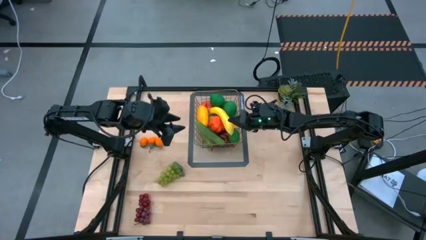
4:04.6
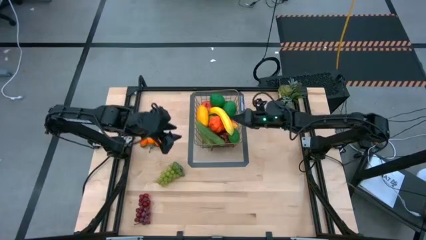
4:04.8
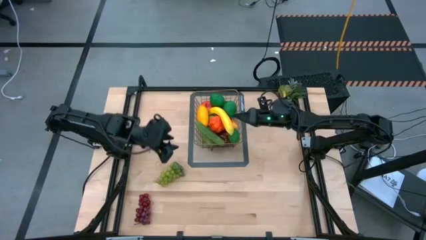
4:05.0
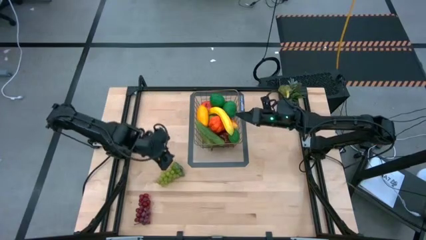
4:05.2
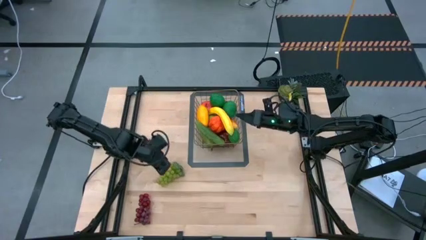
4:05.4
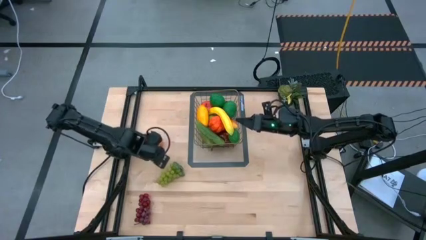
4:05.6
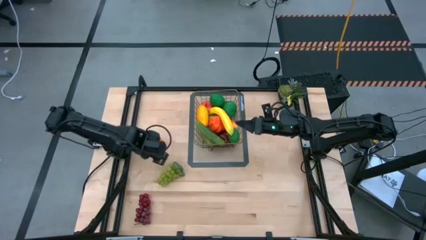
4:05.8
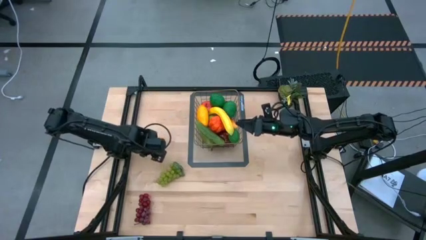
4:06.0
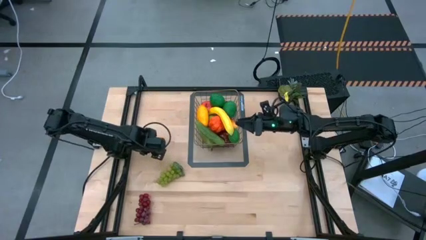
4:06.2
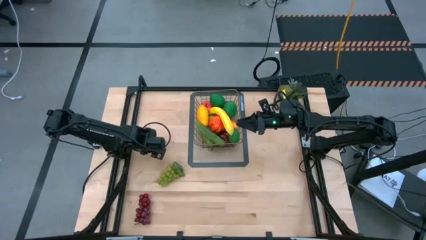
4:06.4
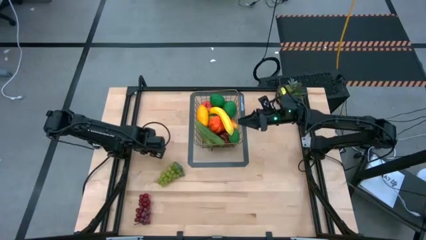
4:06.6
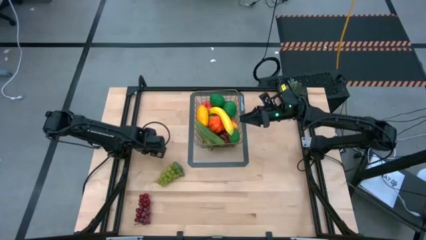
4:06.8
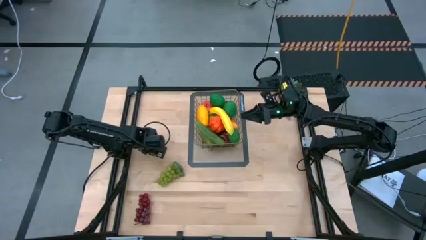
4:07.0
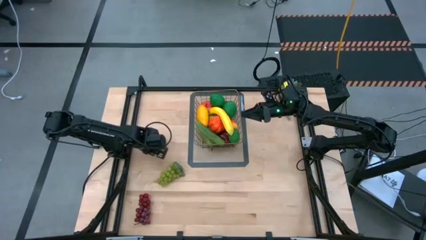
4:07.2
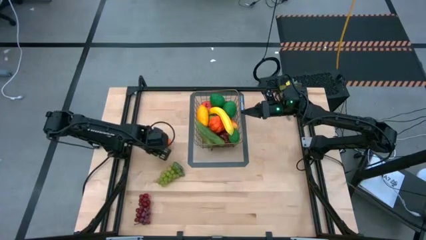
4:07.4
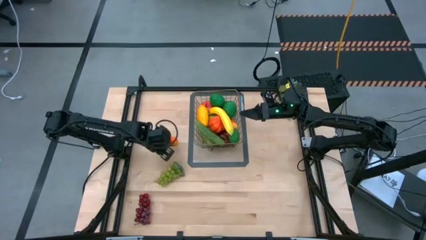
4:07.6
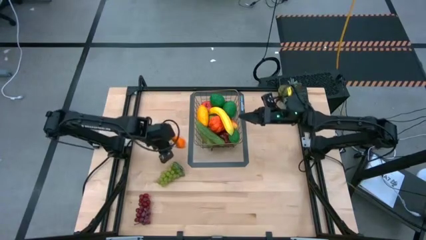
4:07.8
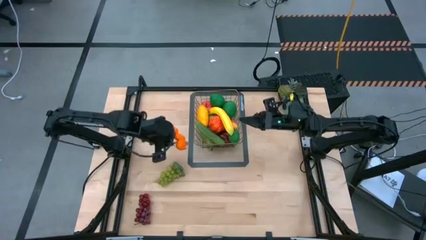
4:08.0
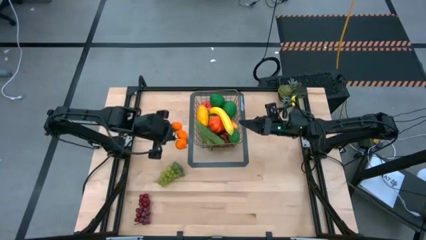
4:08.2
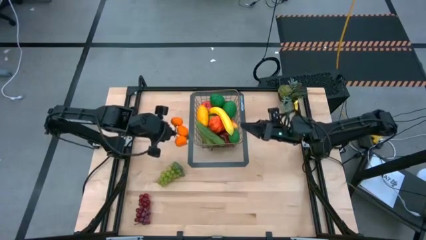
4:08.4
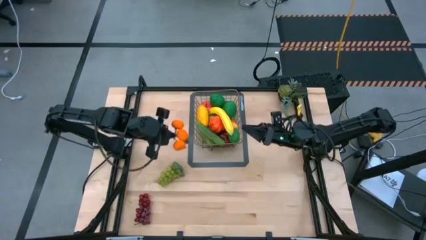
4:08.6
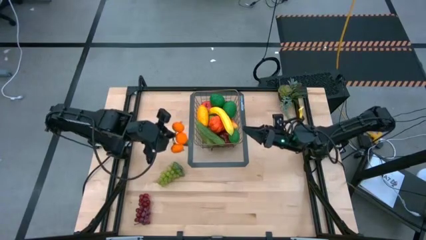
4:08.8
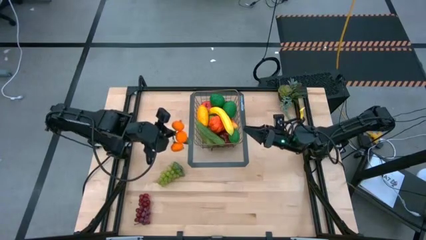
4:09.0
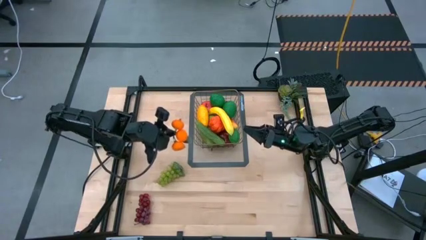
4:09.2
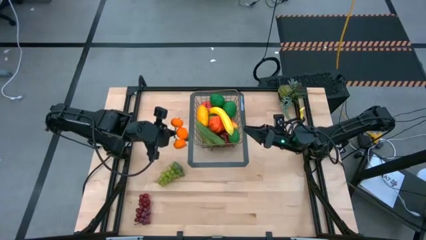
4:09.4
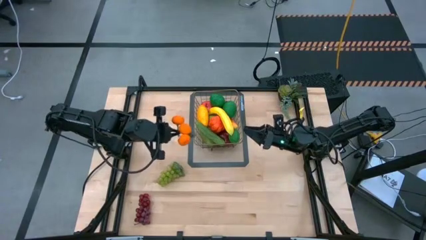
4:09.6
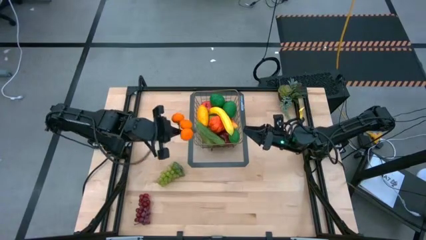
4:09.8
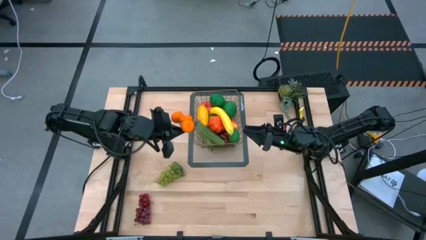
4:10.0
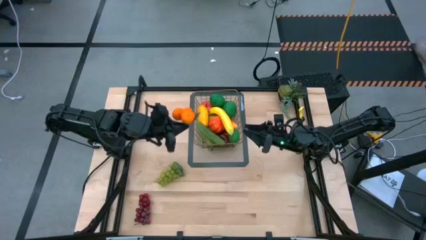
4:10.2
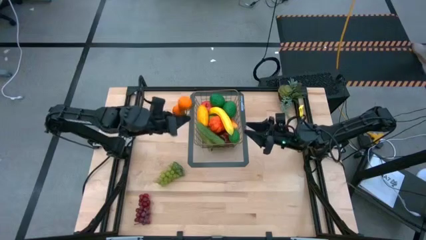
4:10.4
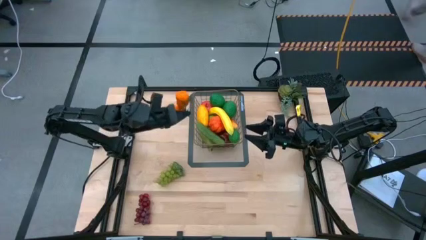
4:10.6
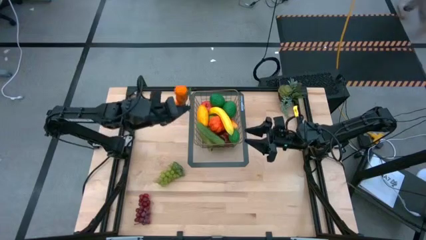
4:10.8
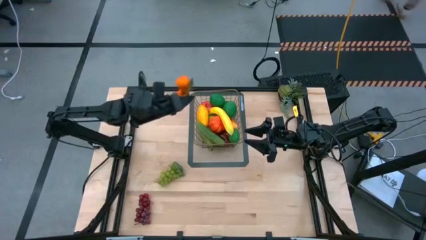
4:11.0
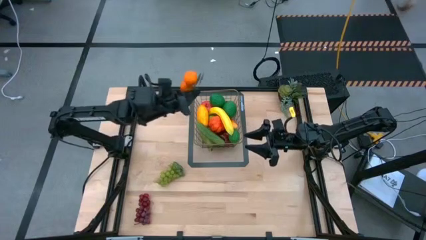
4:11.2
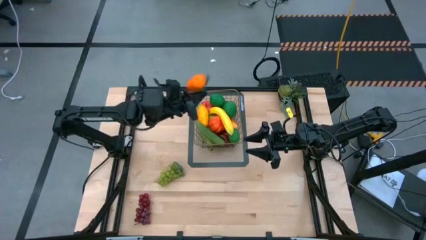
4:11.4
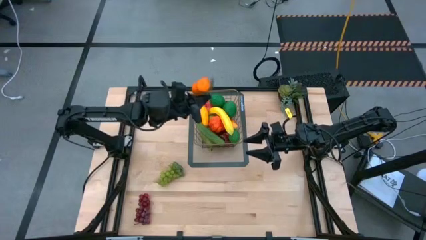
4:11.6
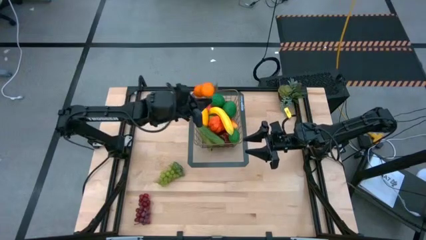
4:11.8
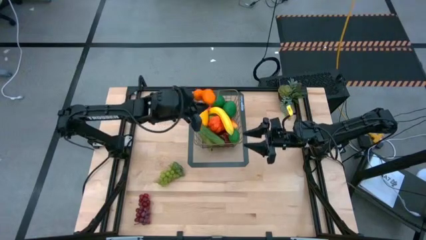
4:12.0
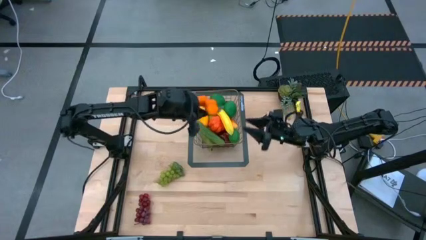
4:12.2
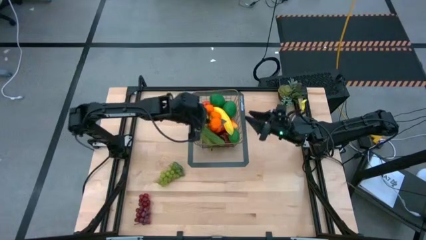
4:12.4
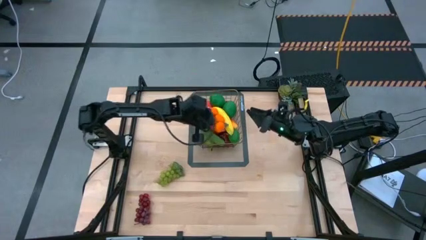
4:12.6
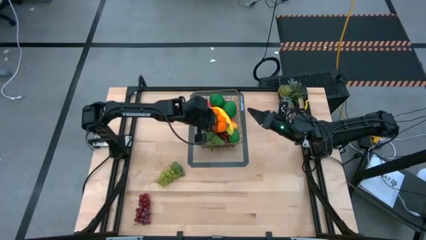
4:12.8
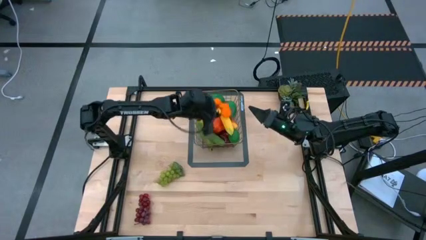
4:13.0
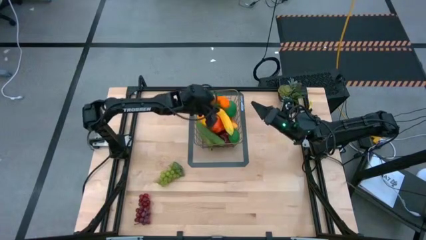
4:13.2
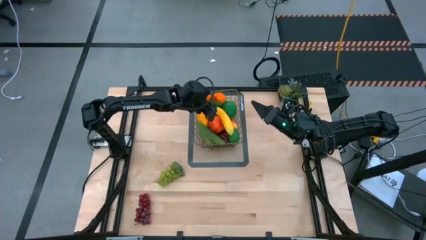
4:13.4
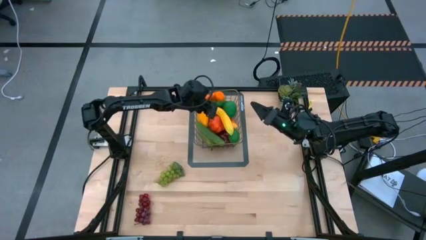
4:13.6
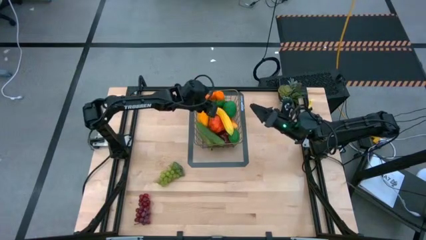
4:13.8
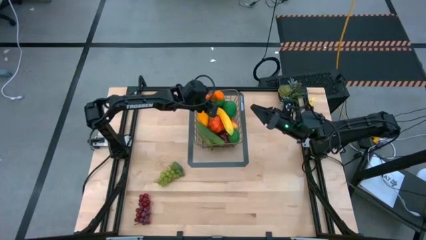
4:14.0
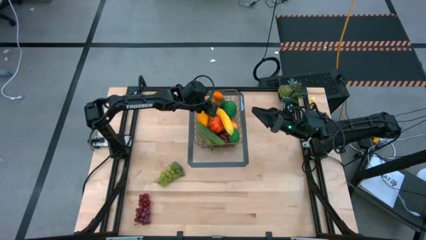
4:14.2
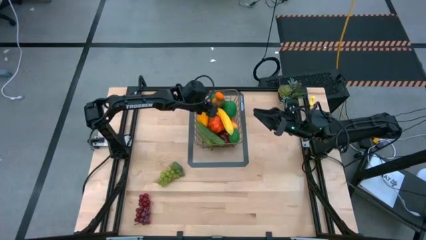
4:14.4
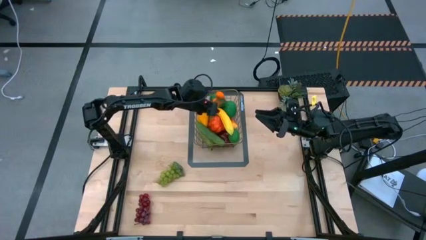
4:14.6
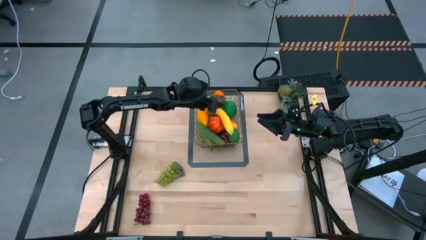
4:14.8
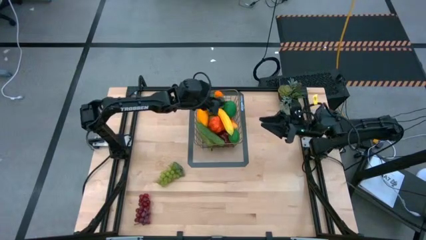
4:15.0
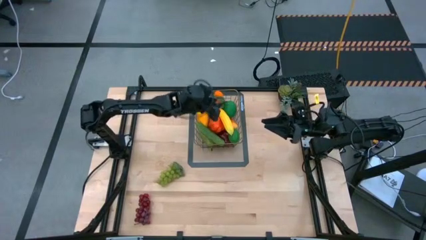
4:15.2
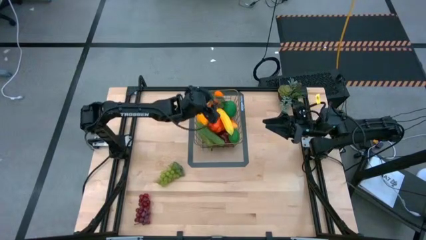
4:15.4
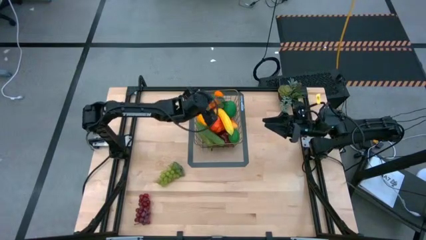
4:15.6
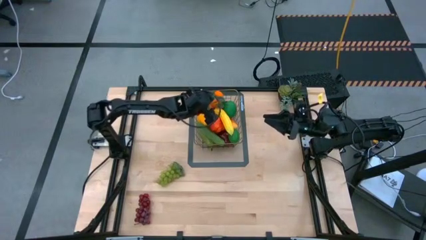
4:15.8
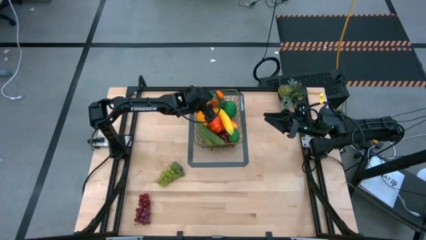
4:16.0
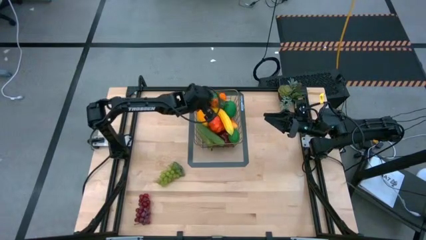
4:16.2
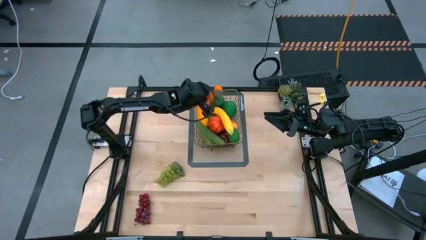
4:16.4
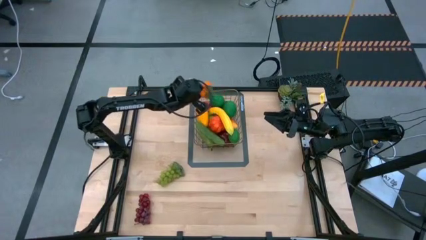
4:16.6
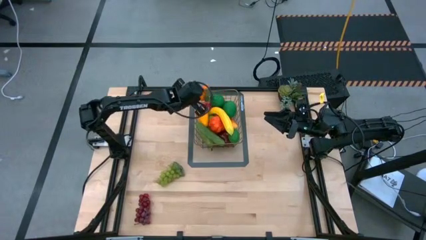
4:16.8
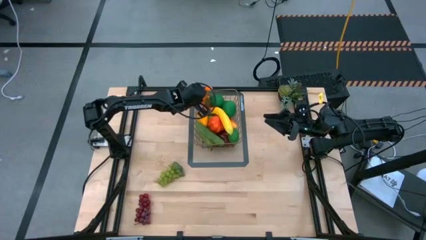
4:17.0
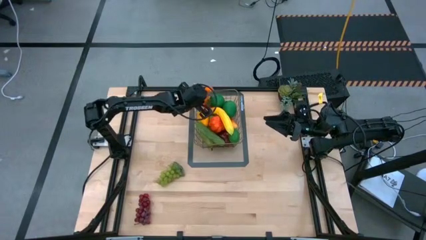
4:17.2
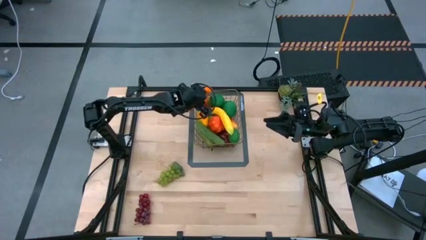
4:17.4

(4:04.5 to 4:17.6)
Task: Build produce basket
Put the orange tangerine into the gold wire basket

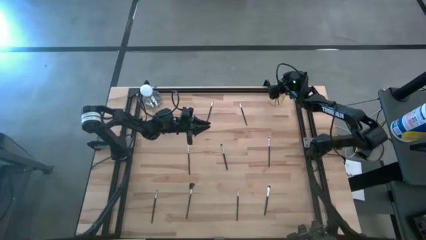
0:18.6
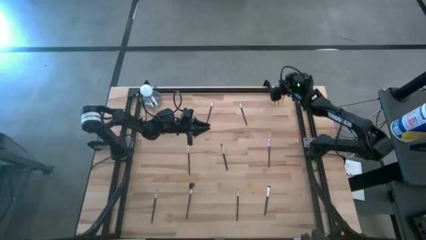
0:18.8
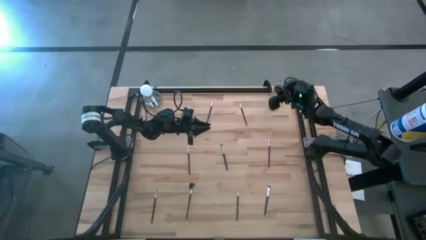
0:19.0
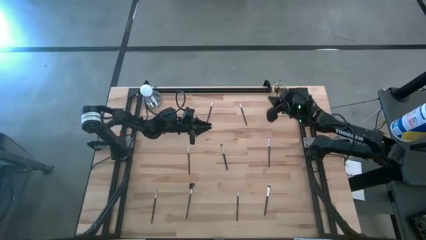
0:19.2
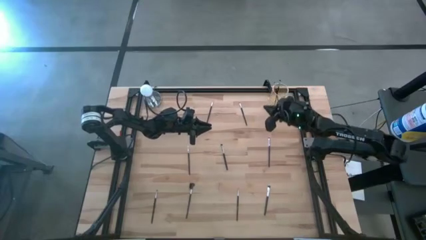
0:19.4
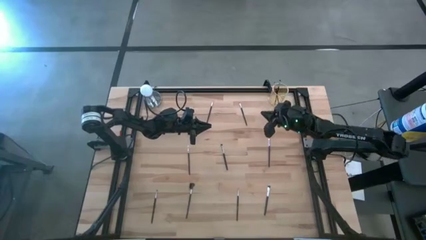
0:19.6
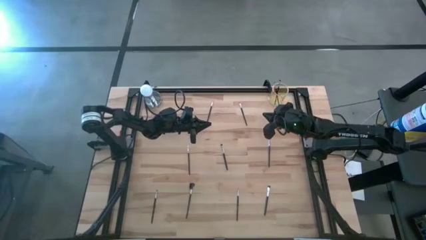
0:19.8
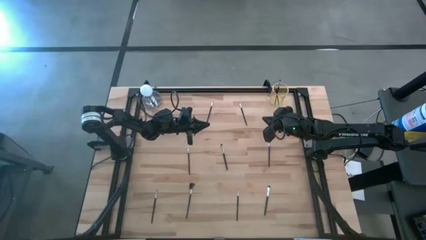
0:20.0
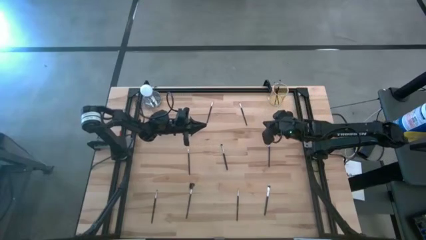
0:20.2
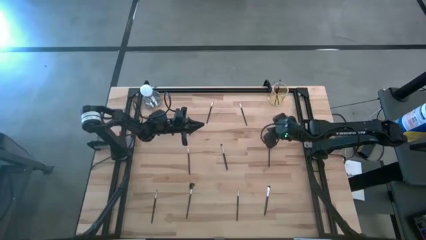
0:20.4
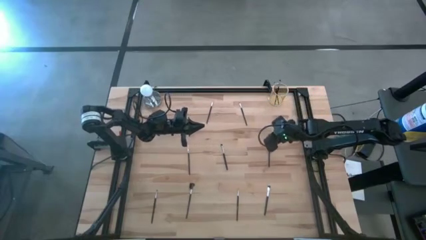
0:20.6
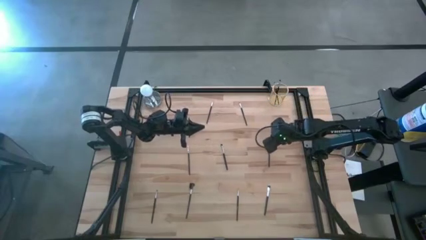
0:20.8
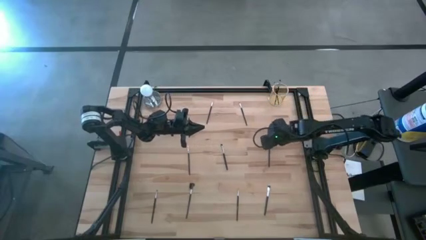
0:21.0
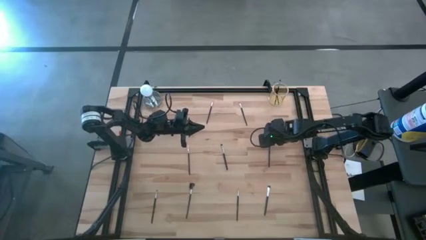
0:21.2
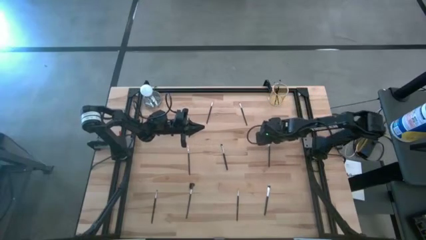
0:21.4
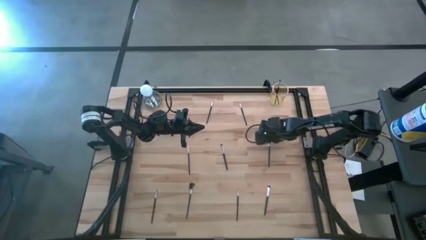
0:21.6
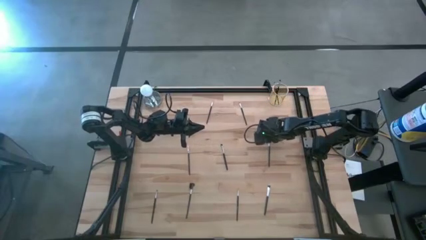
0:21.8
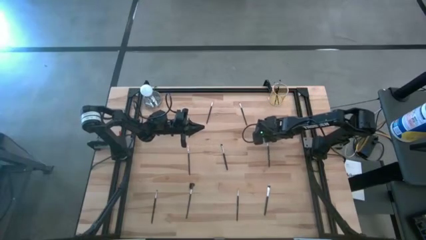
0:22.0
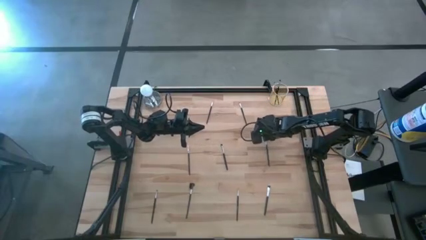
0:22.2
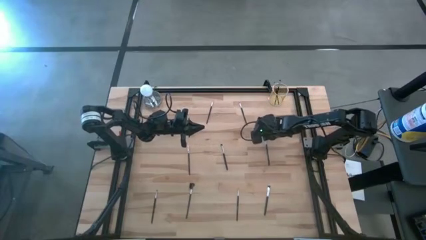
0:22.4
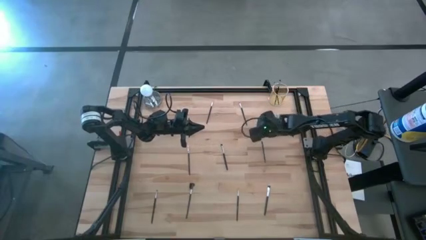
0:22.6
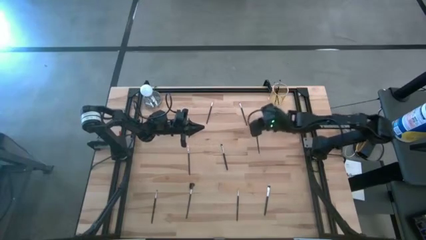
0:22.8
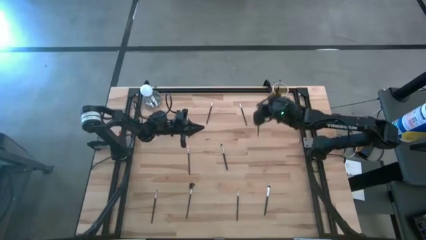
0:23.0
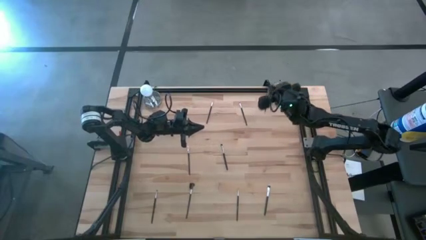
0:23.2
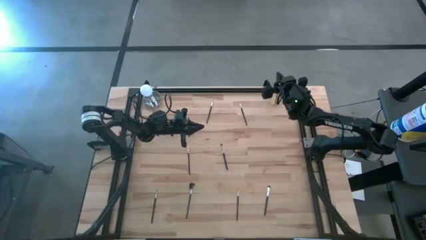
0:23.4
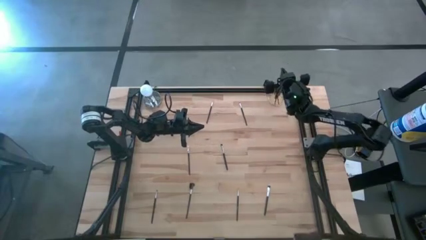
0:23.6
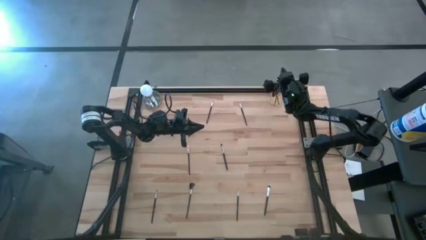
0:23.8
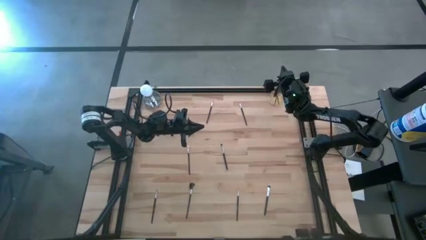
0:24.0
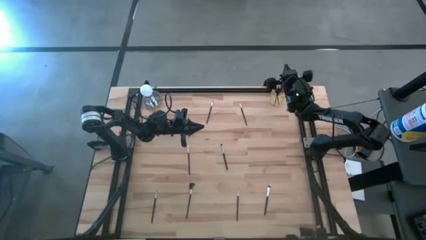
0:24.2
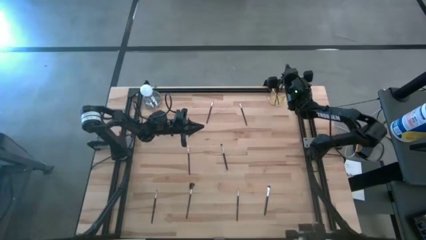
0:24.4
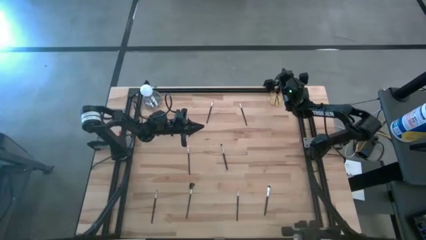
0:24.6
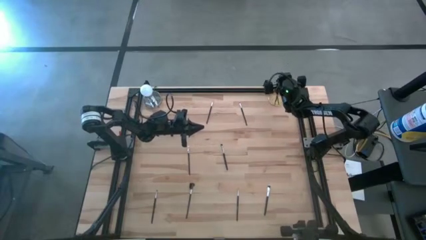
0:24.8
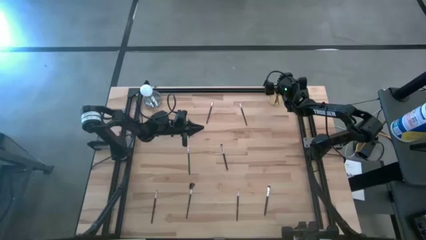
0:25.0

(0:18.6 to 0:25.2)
Task: Sort items
Put the black eyeshadow brush into the gold holder
